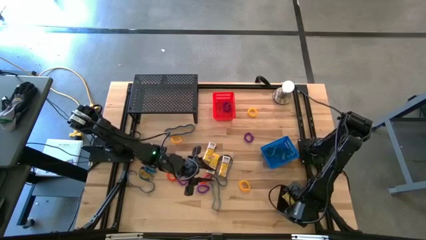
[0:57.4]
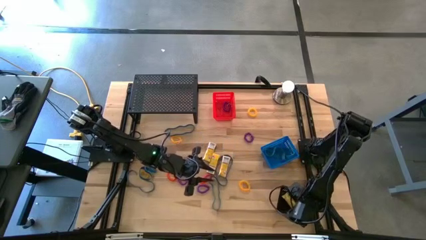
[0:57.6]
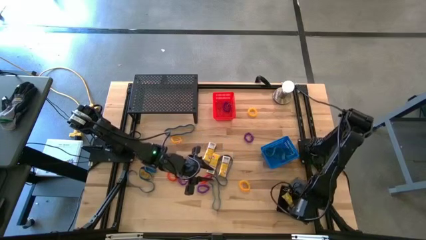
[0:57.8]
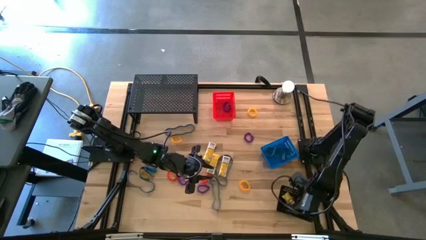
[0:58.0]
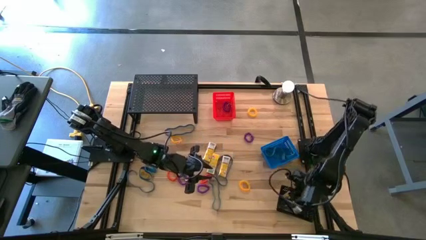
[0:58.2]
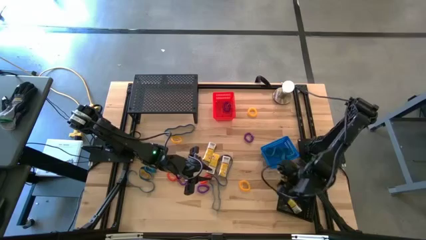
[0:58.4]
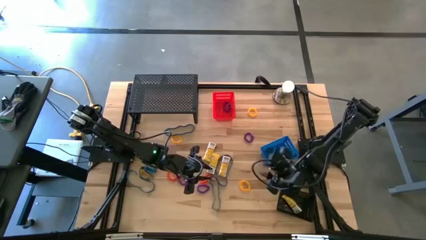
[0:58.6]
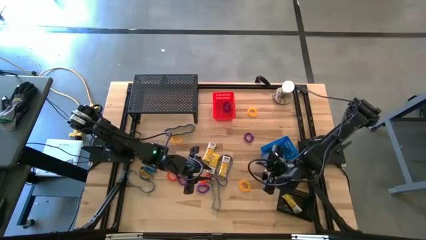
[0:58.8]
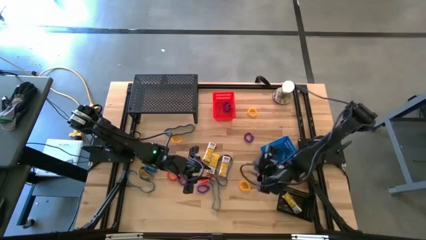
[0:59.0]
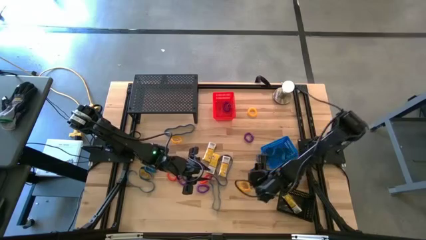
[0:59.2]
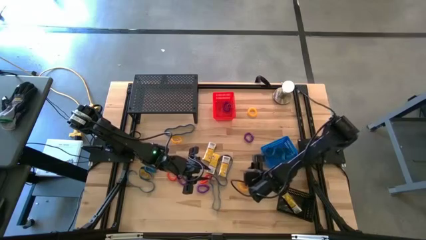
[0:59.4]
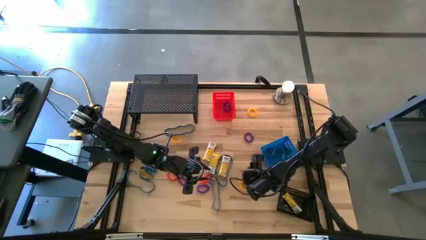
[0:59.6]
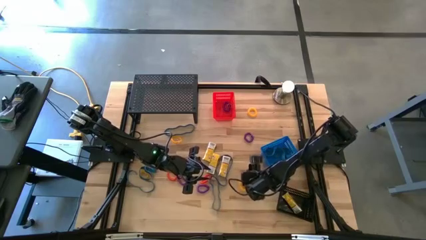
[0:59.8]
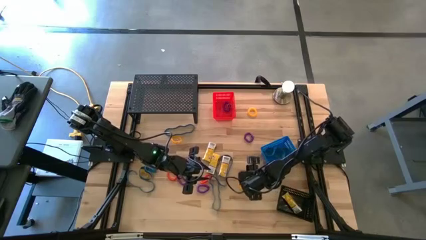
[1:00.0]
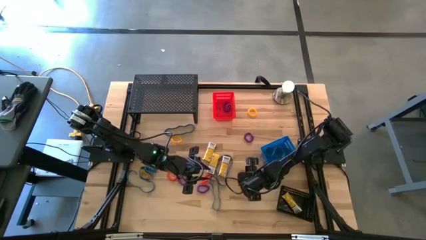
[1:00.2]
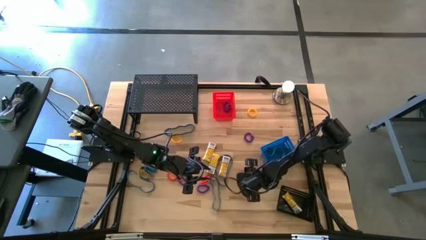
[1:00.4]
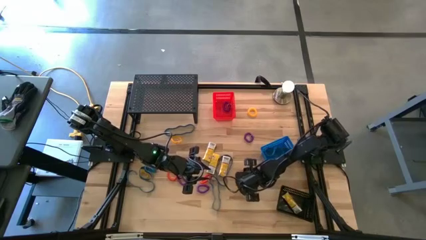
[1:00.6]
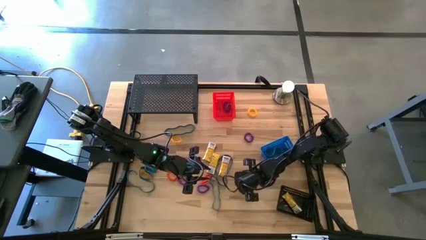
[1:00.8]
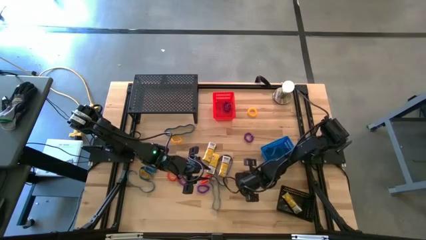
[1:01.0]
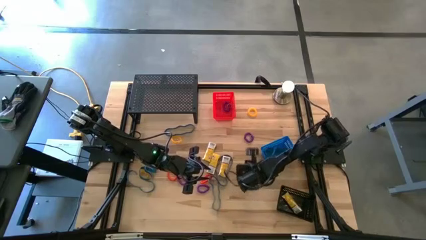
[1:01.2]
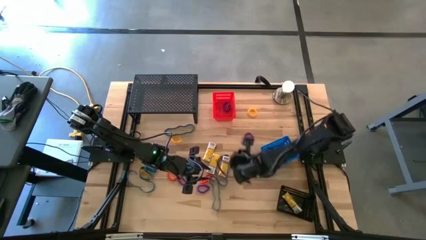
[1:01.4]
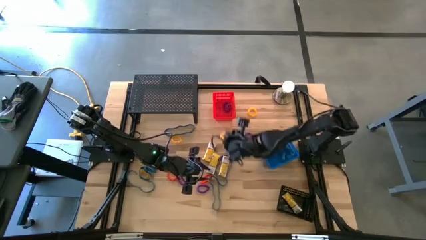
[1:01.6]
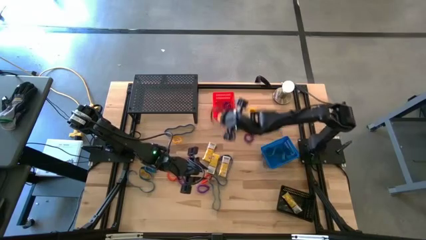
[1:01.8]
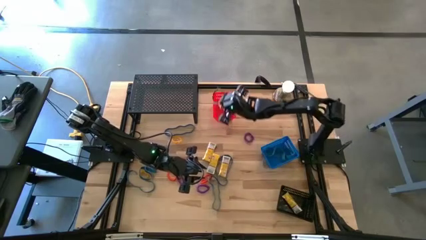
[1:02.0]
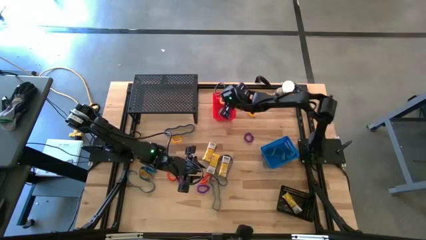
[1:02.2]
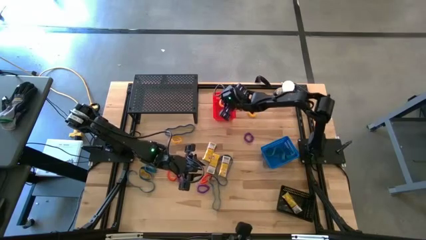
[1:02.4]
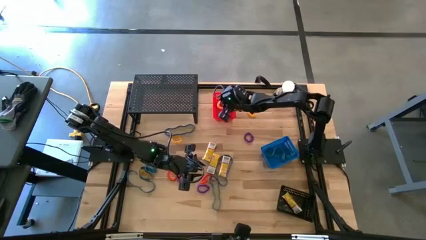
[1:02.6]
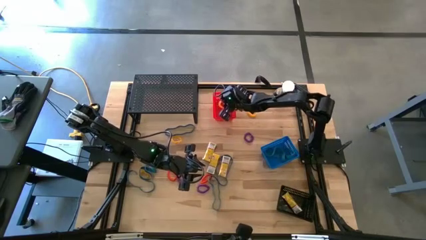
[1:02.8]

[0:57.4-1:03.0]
Task: Pick & Place Office Desk Supplies
Put the yellow spring keychain into the red bin

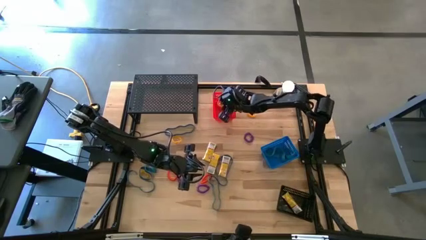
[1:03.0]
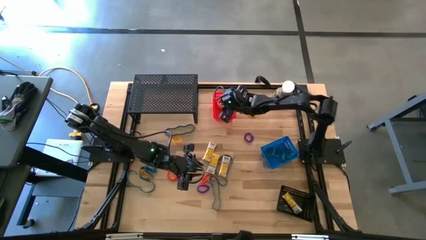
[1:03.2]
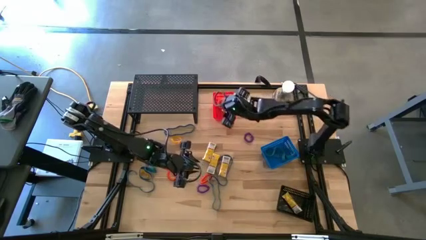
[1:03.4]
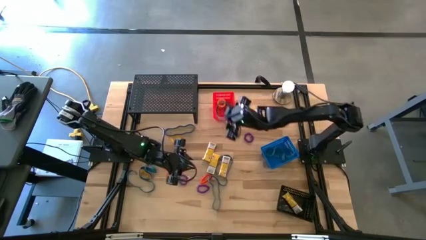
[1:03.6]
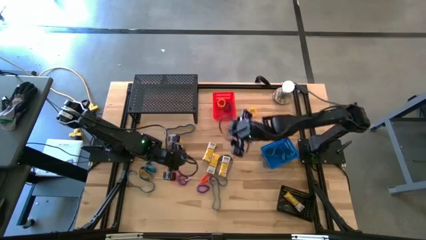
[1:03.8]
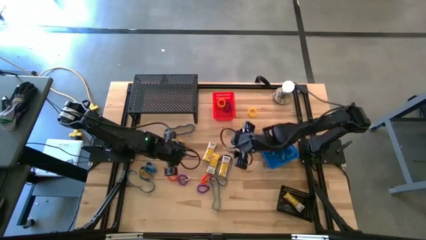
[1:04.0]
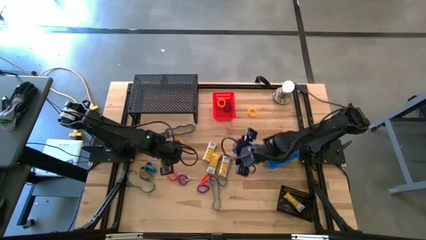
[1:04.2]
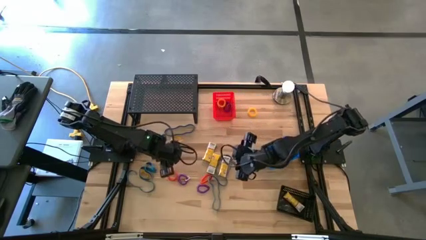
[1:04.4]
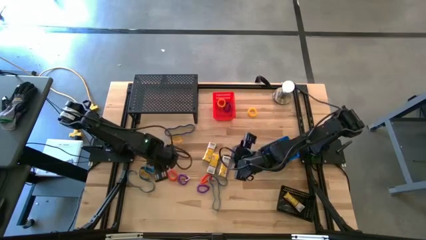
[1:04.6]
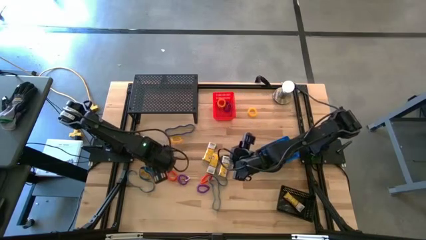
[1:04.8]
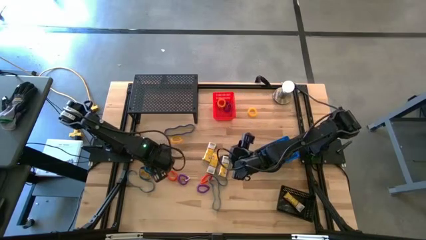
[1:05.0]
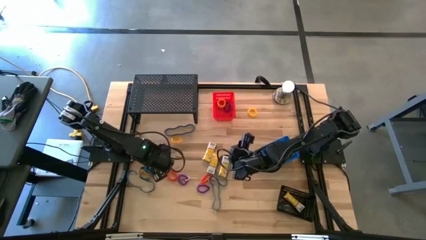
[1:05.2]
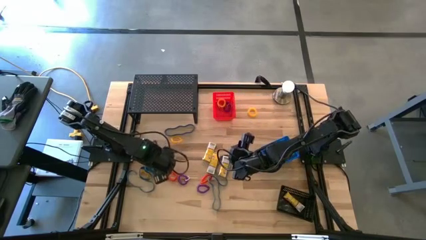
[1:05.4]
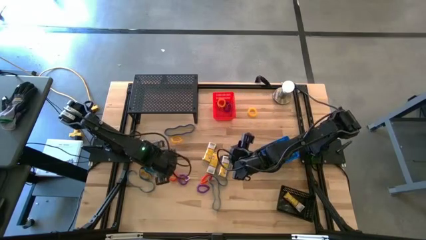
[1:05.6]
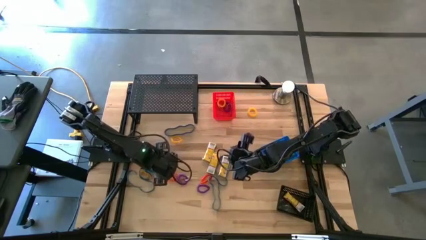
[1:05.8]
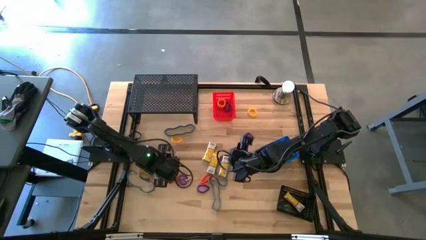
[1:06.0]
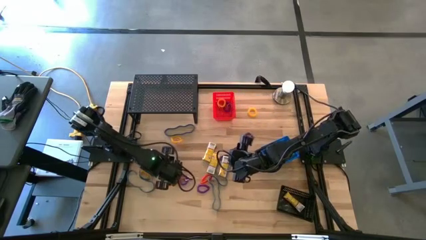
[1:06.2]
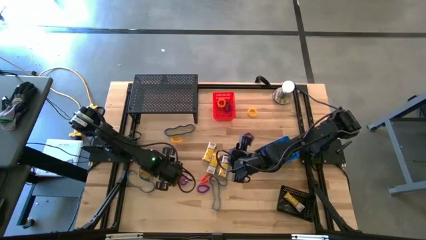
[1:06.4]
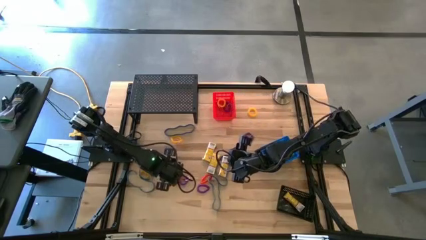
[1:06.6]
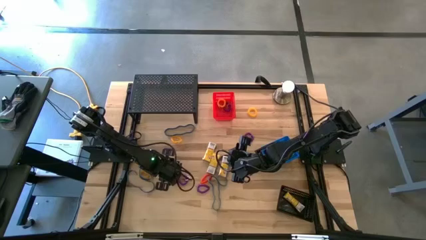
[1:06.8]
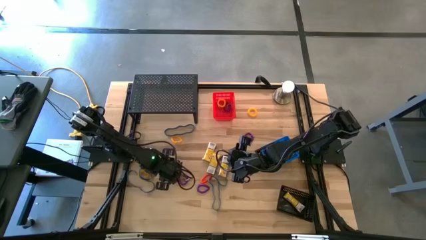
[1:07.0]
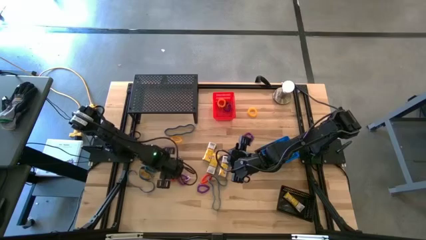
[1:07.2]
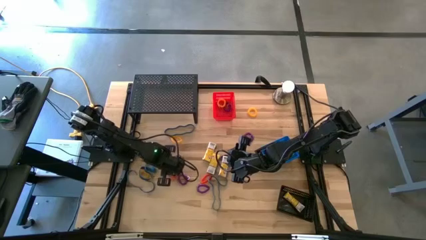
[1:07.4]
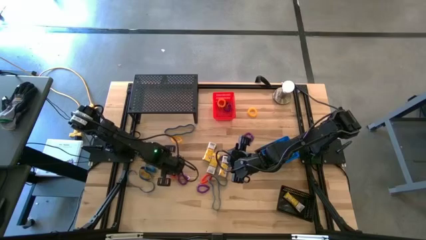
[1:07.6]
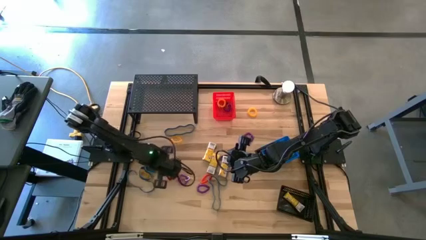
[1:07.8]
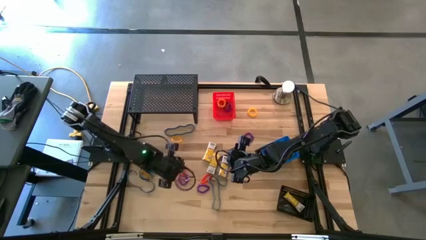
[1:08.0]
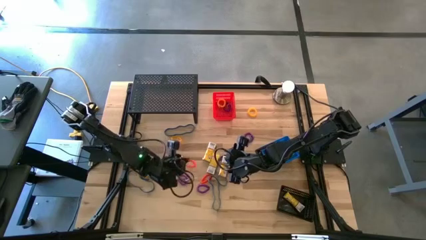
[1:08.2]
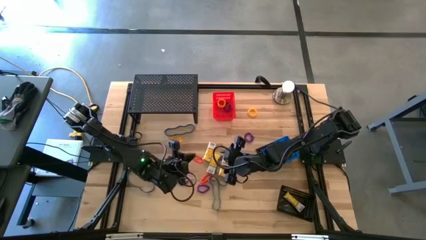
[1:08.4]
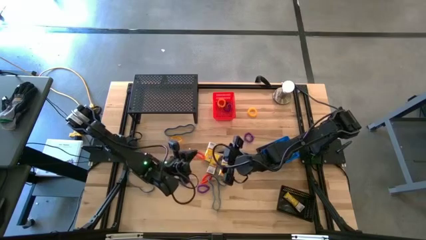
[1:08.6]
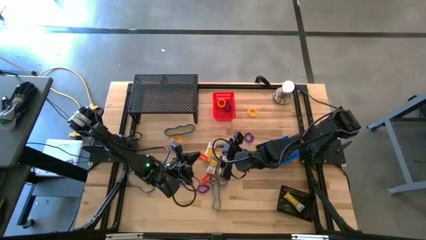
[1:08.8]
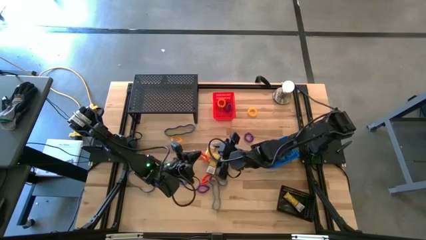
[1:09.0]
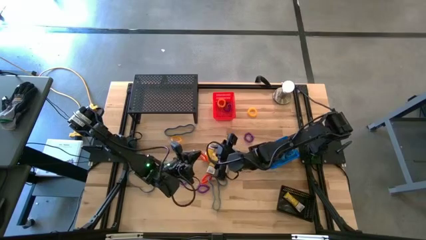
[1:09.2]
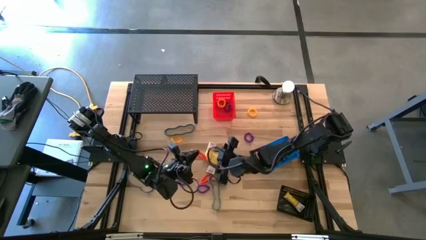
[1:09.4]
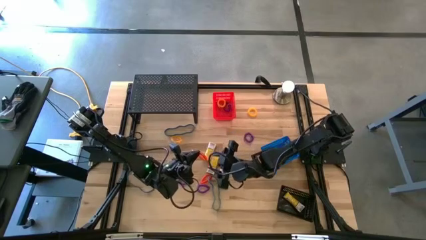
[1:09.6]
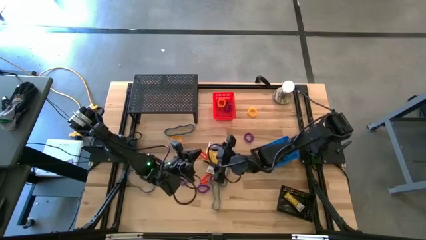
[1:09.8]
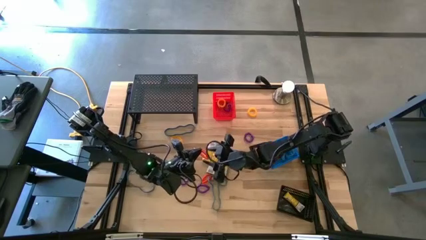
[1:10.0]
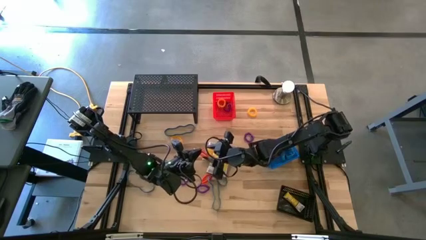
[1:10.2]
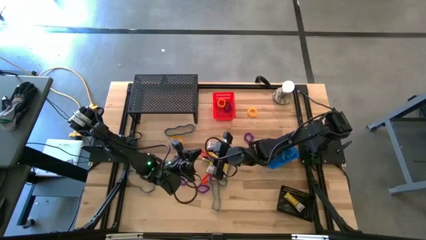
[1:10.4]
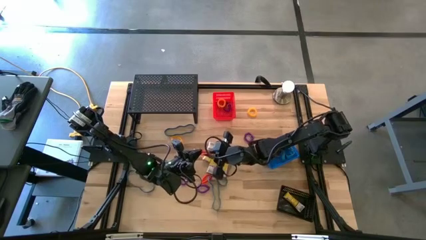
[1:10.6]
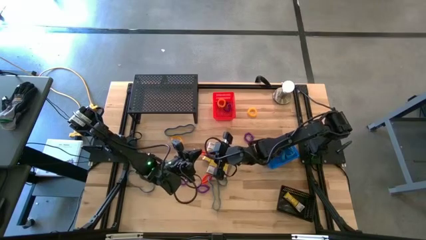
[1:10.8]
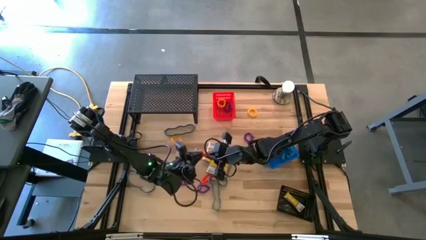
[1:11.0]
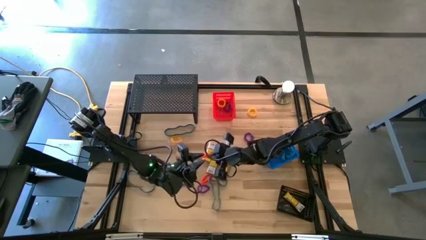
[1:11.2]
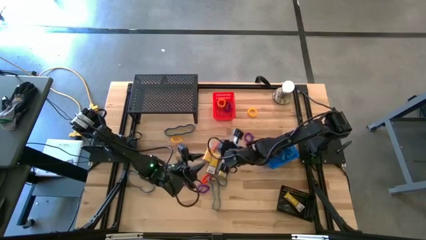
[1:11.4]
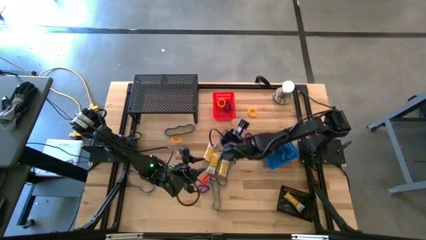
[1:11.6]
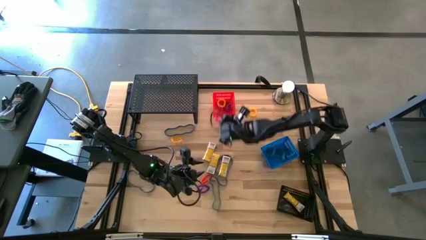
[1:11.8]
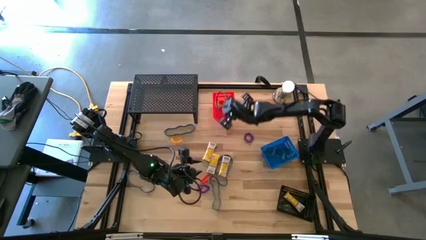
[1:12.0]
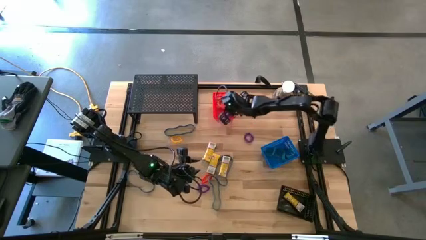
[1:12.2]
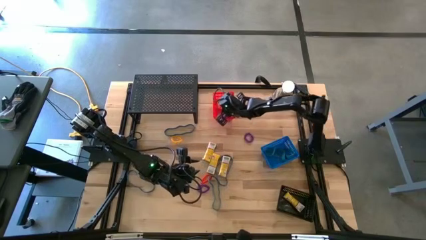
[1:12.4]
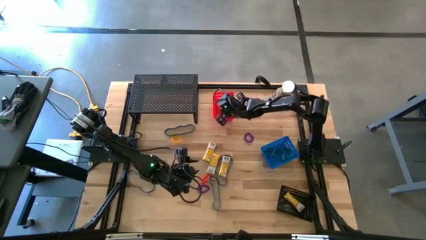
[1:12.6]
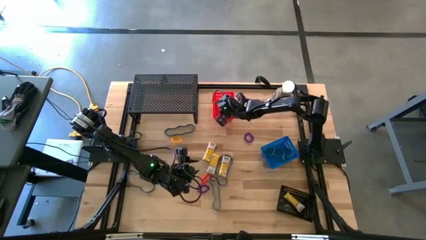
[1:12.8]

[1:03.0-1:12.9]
Put the red spring keychain into the red bin

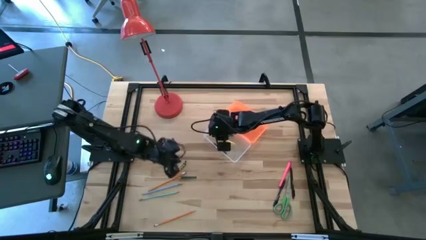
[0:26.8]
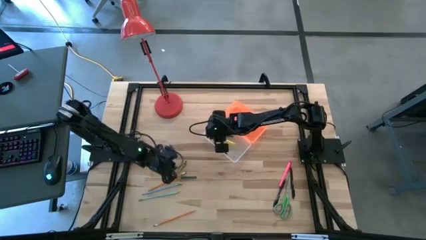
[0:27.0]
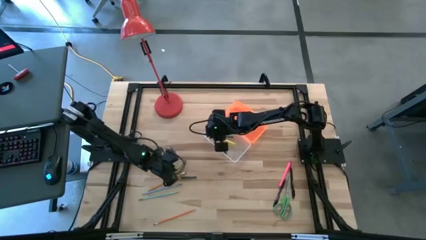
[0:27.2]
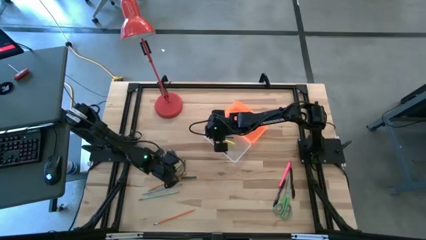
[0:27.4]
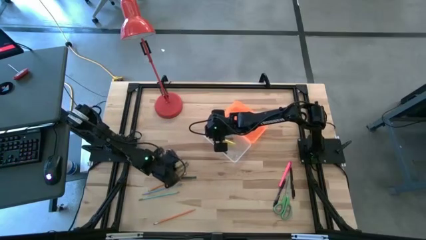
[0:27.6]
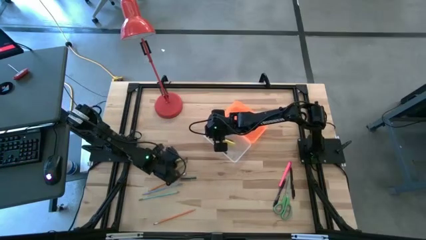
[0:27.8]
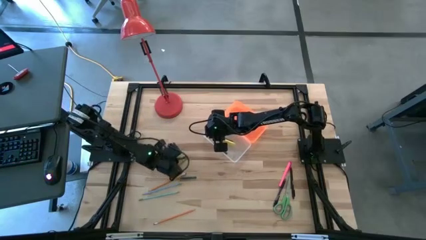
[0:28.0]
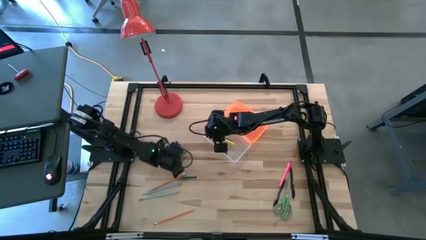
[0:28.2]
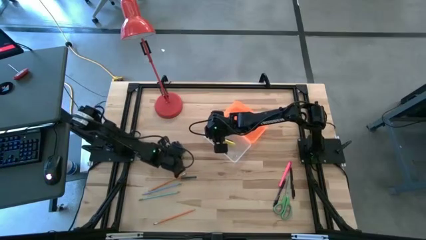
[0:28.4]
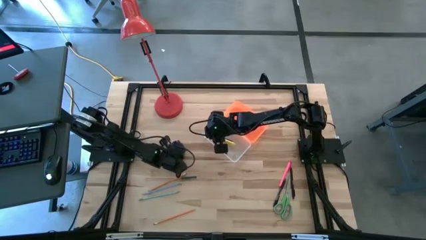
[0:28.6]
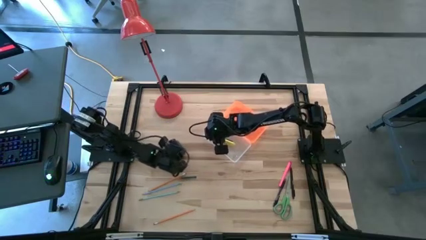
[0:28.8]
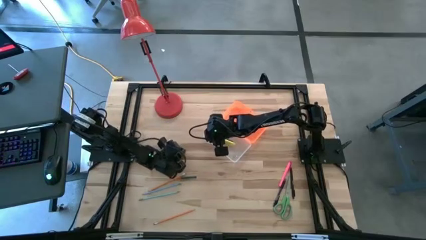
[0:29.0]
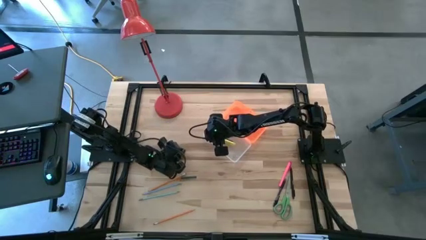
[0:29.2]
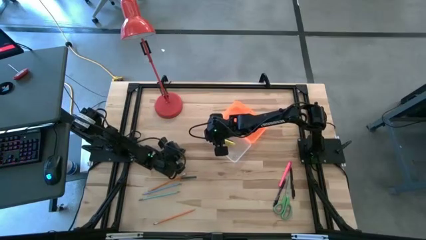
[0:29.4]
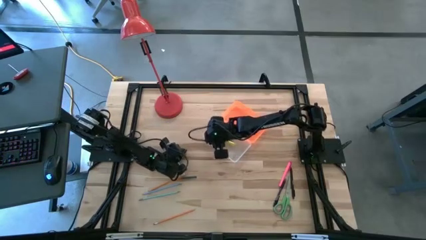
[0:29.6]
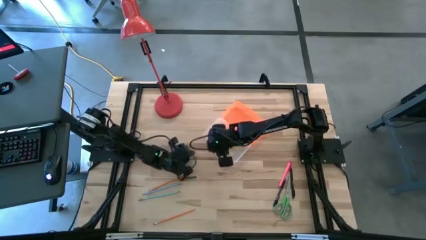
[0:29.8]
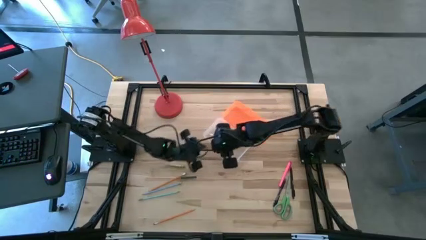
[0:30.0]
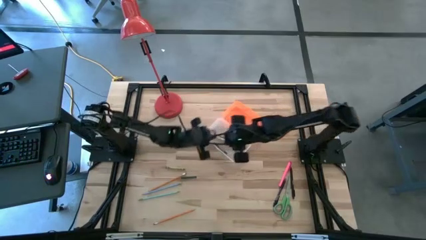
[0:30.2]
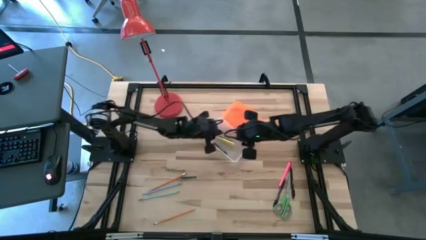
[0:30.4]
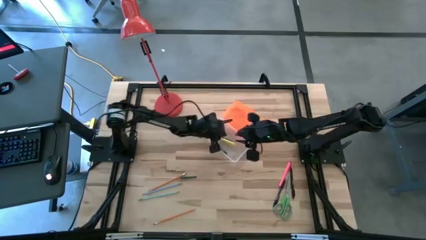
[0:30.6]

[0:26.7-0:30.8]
Task: Pick & place school supplies into a supply box
Put the top yellow green crayon into the supply box
